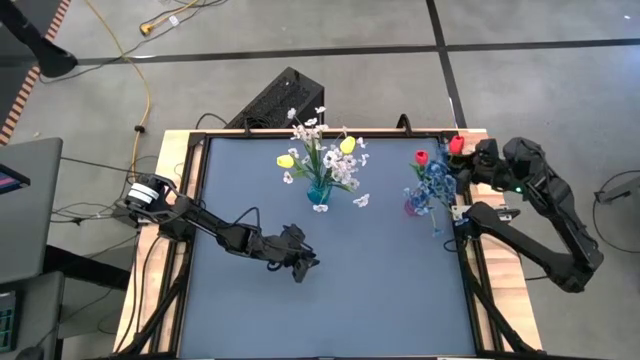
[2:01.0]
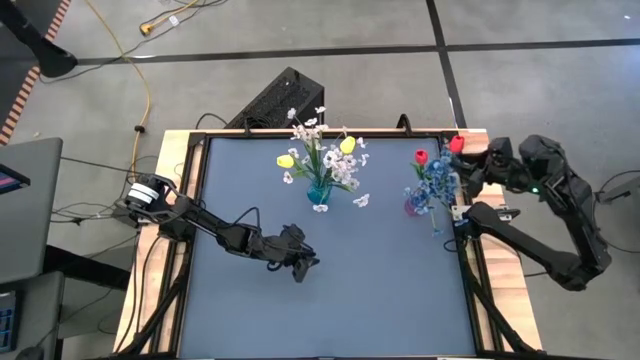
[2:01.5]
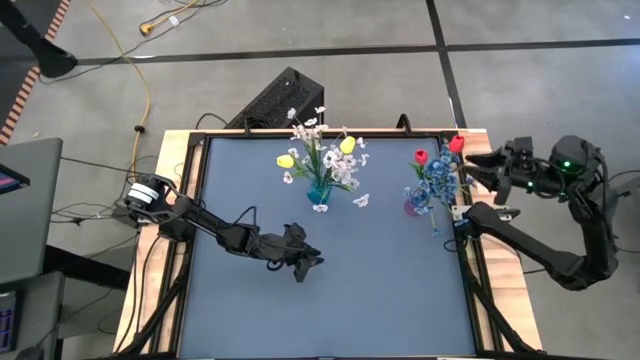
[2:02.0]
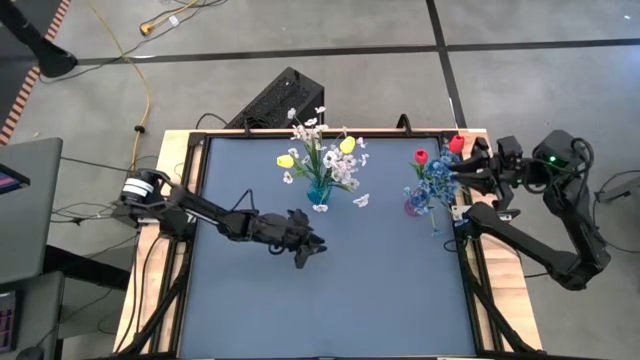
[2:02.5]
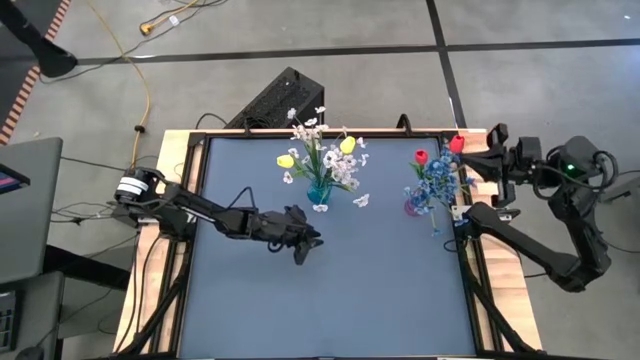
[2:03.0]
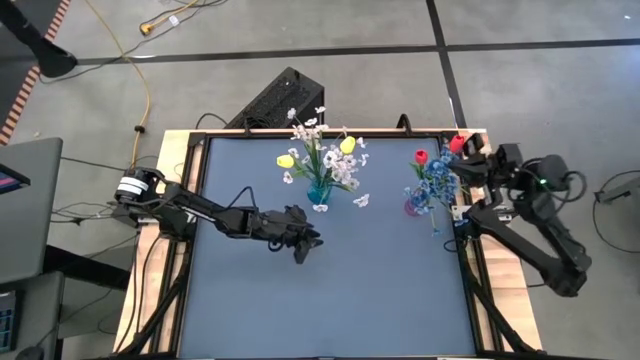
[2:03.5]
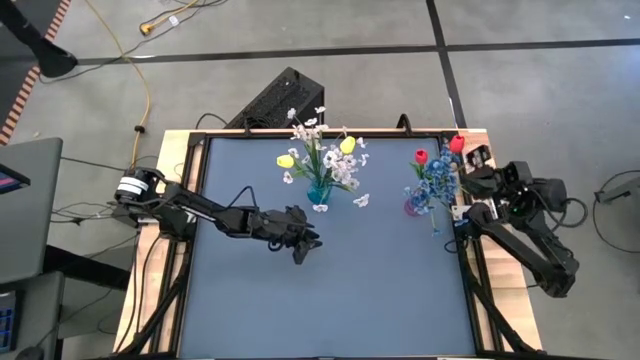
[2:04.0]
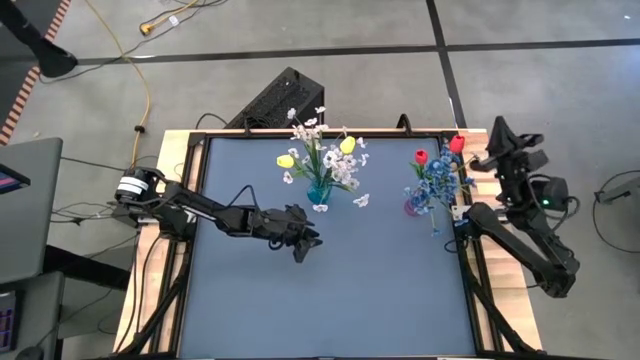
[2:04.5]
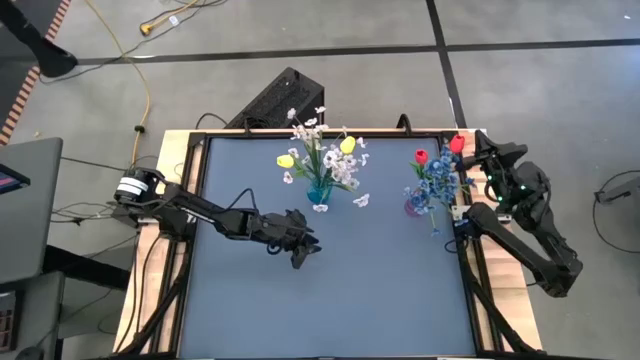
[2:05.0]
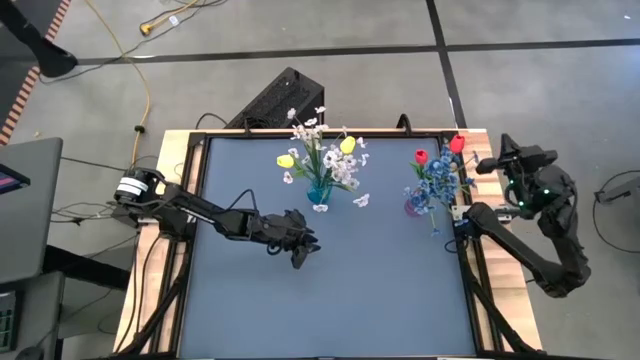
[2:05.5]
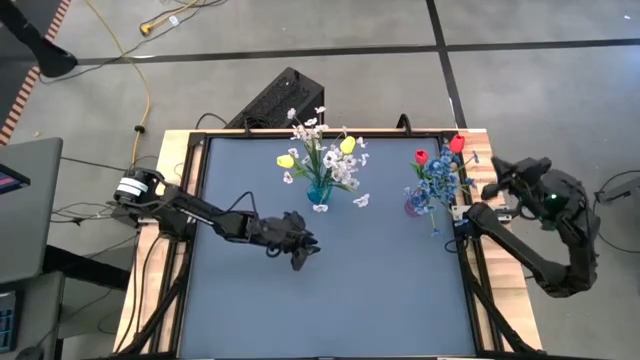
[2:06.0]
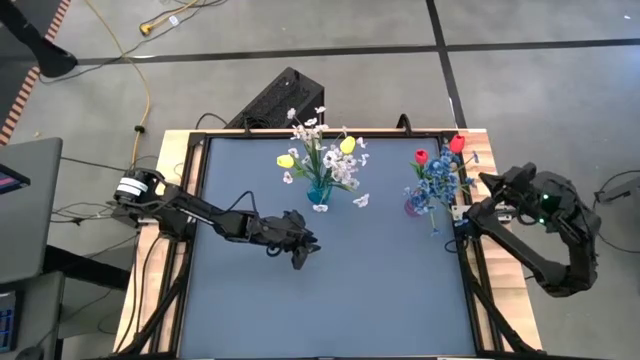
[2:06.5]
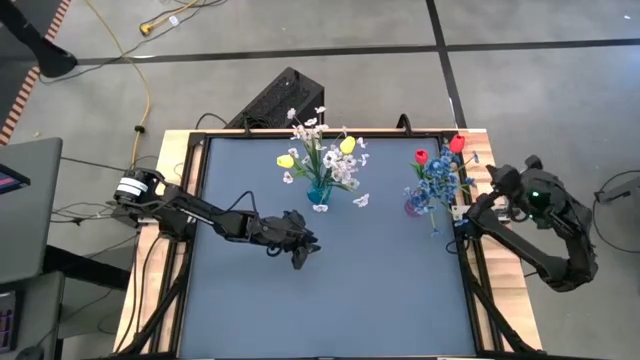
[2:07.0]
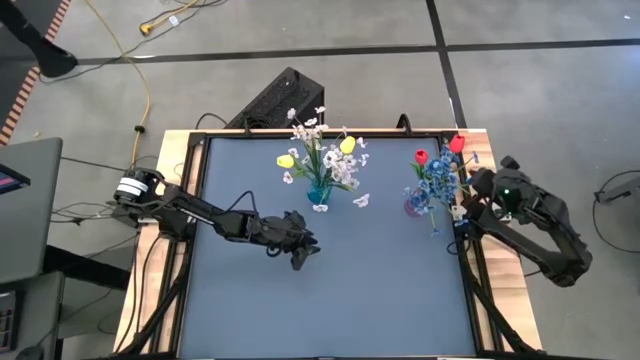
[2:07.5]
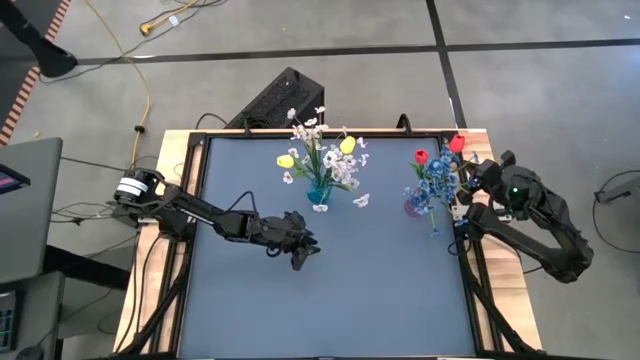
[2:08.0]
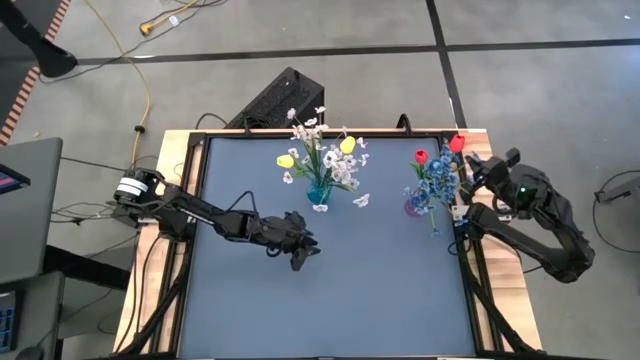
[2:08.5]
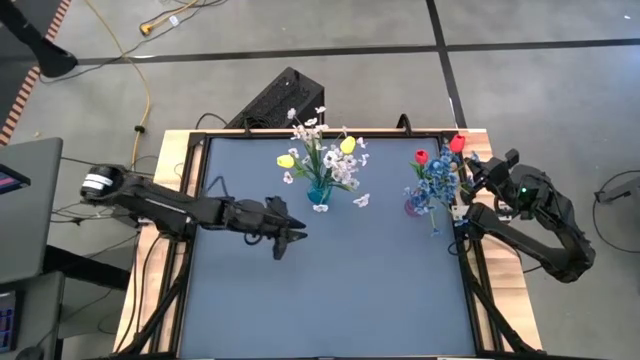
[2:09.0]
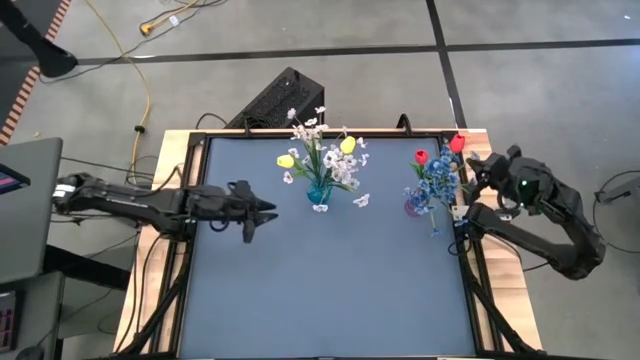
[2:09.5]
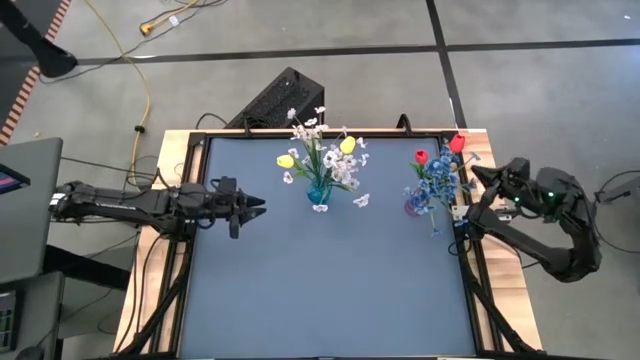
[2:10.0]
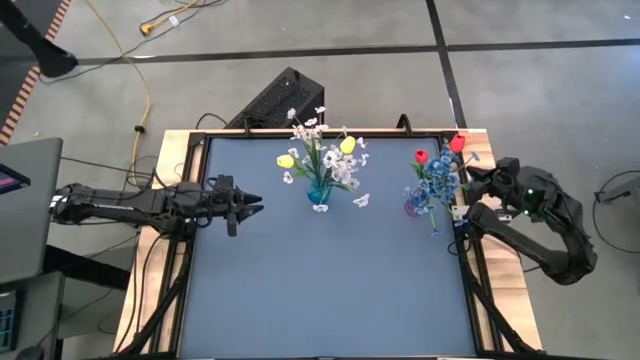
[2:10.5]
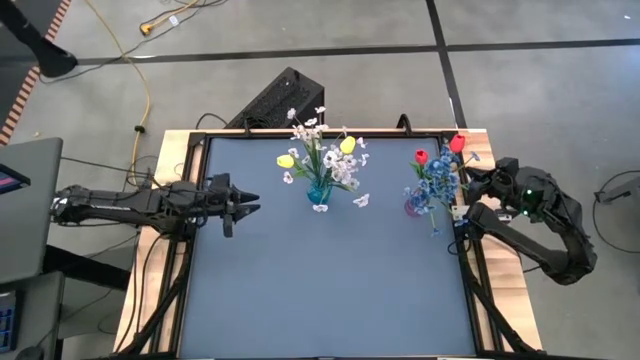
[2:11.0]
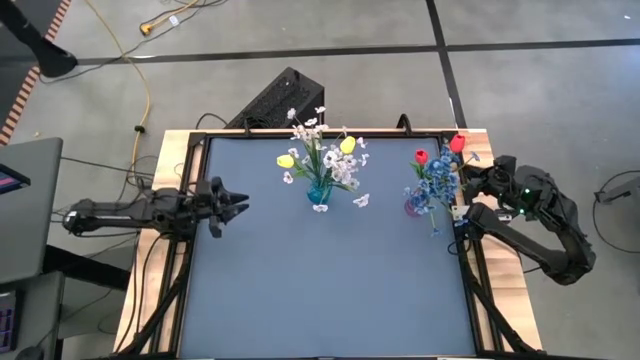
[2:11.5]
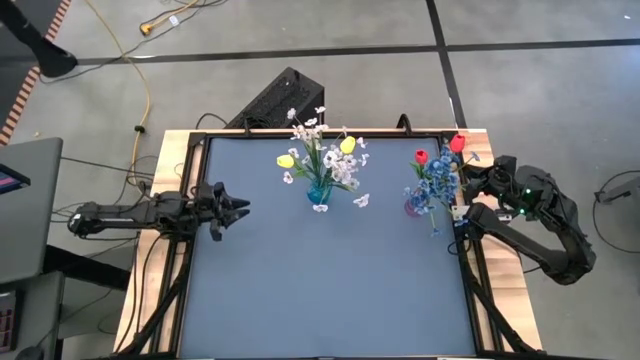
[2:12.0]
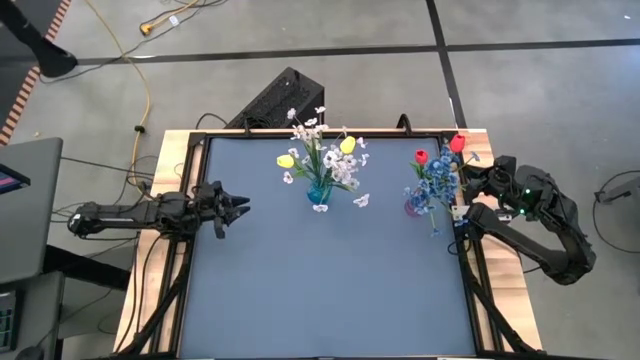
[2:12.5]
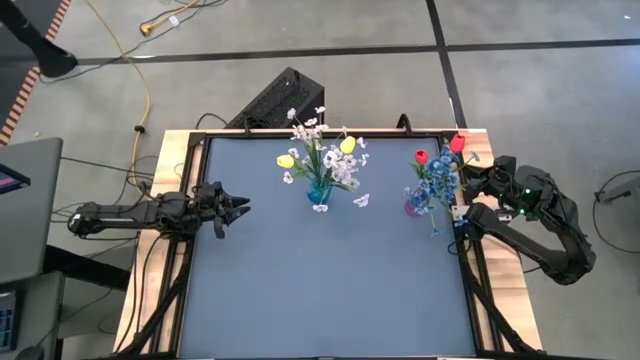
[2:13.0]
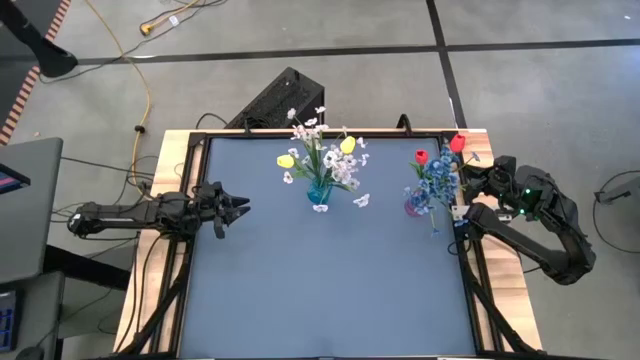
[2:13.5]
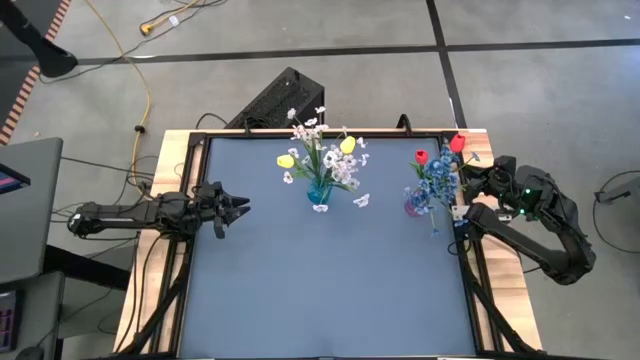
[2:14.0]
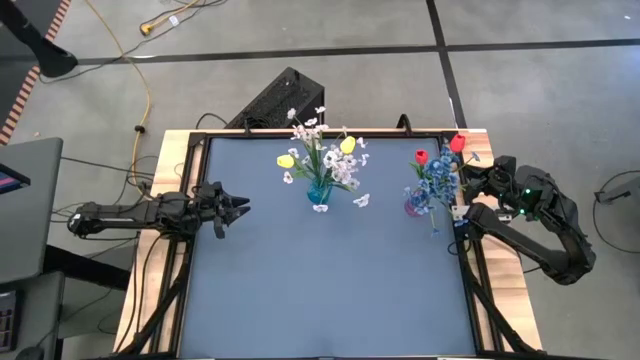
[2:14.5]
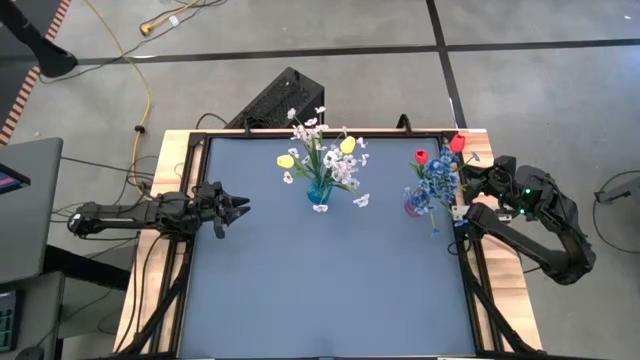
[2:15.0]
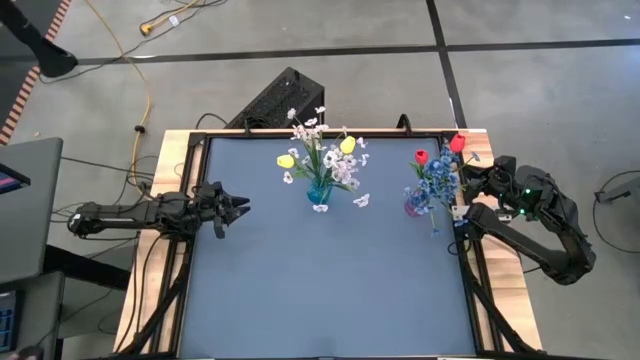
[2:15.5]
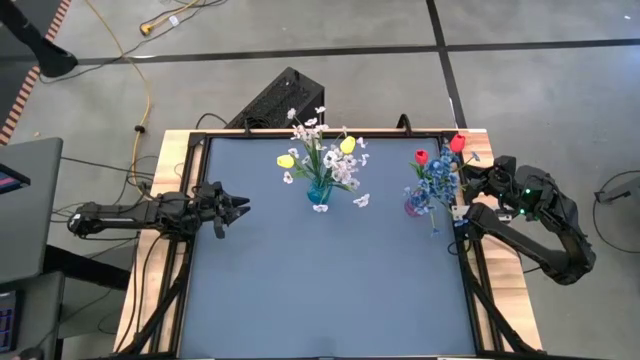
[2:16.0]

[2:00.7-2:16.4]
Task: Sort flowers into vase by color
Return to Home Position

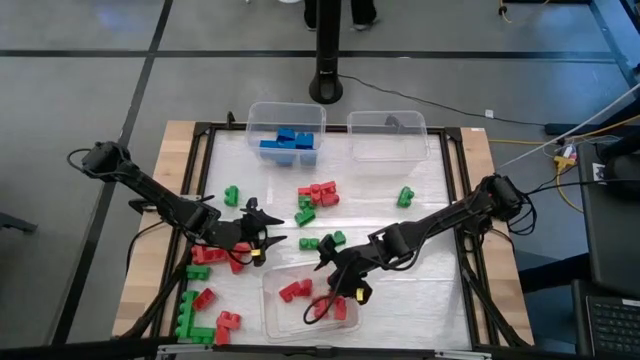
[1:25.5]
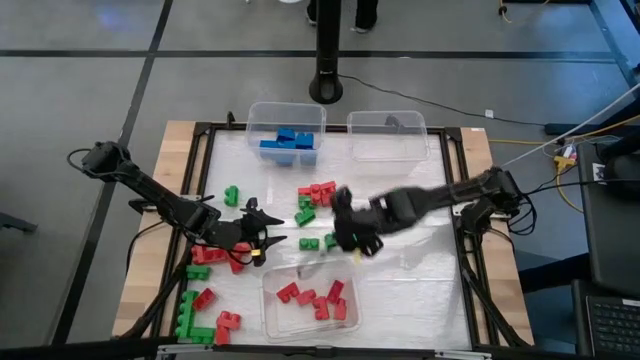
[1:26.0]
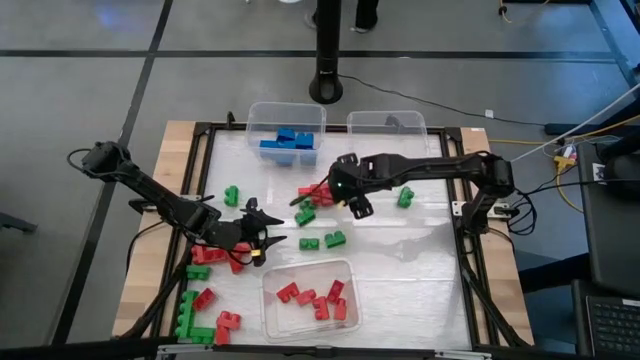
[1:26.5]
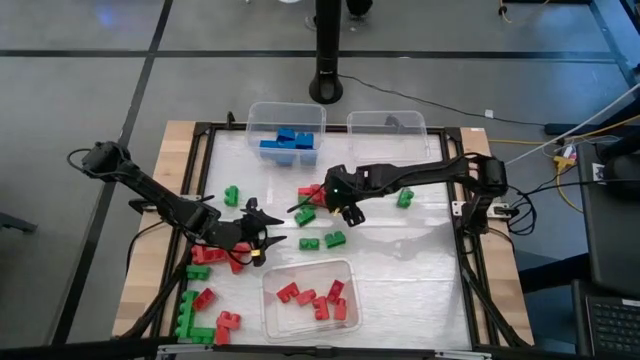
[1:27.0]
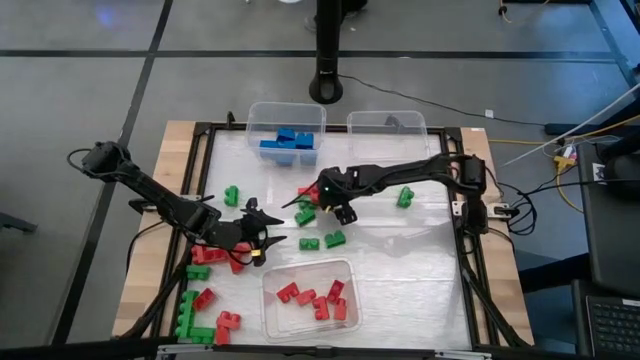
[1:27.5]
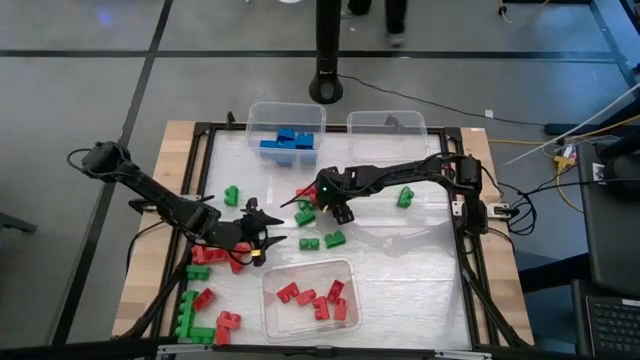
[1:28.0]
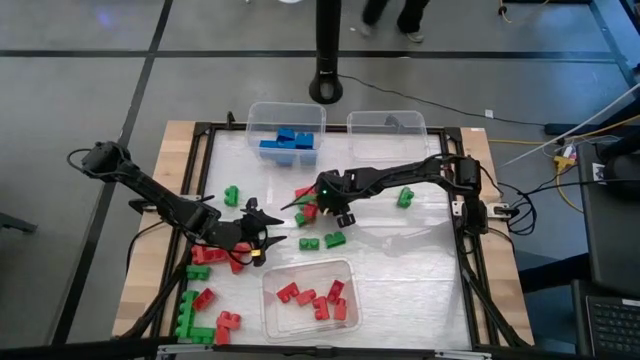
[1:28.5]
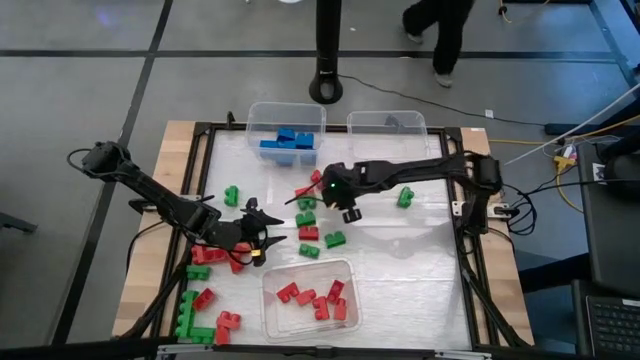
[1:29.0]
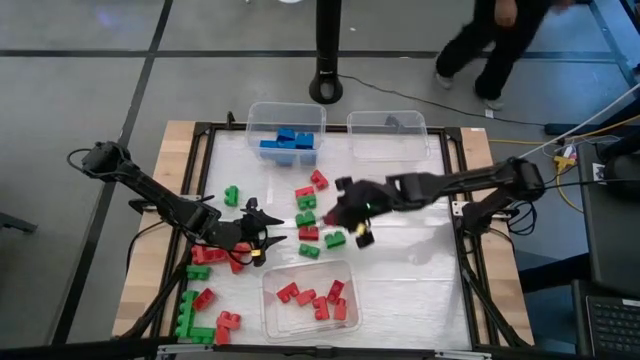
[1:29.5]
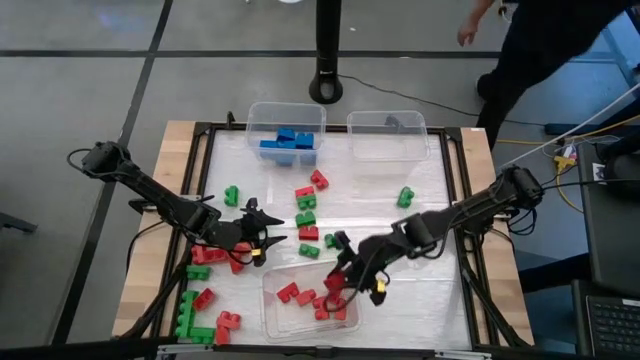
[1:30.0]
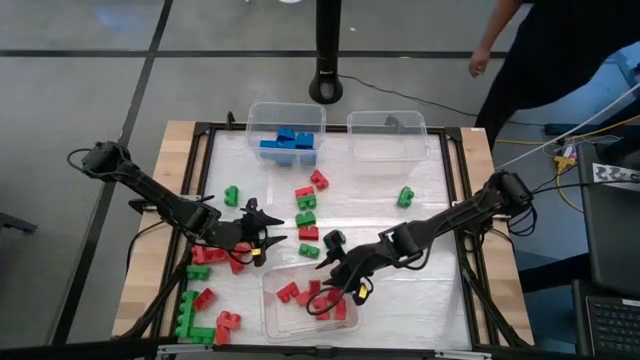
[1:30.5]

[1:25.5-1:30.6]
Task: Sort blocks
Put the red game piece into the bottom transparent bin
